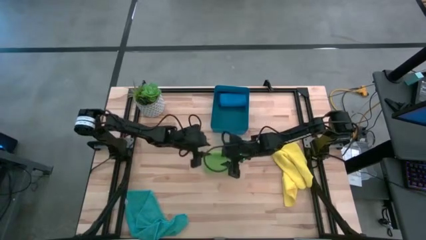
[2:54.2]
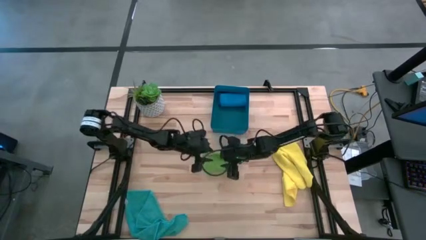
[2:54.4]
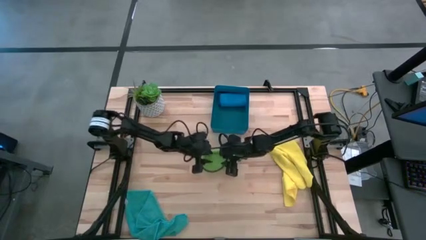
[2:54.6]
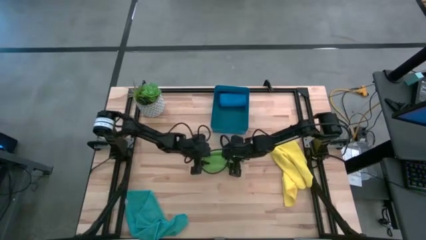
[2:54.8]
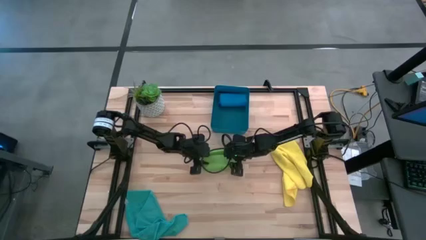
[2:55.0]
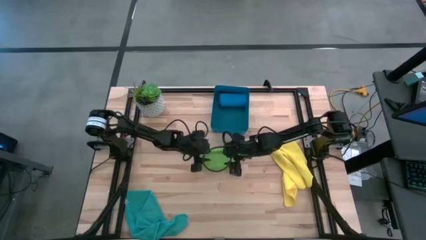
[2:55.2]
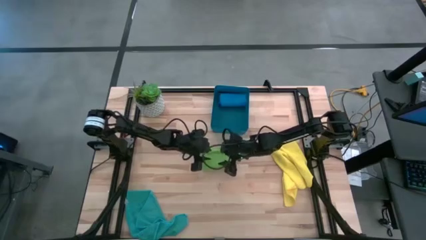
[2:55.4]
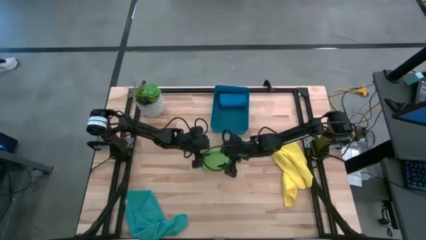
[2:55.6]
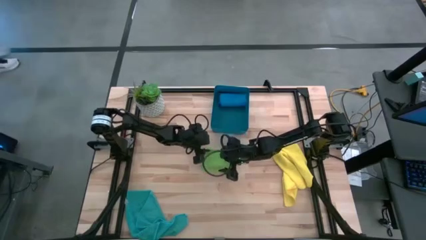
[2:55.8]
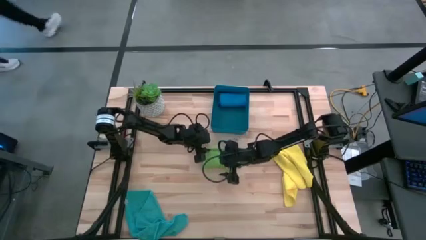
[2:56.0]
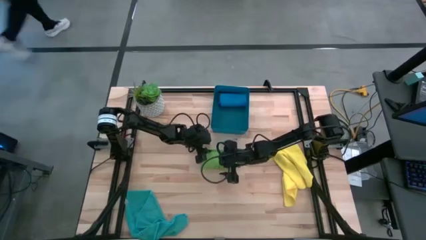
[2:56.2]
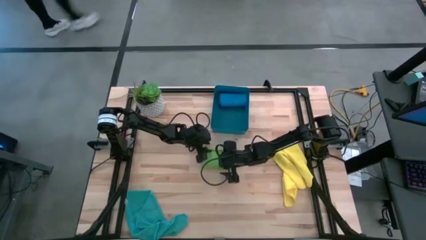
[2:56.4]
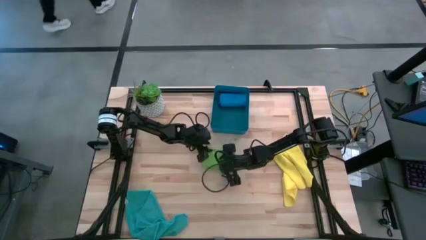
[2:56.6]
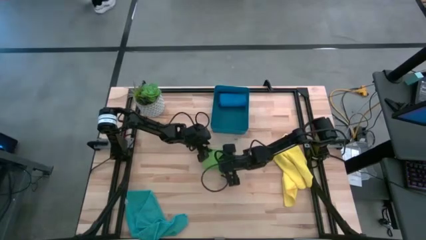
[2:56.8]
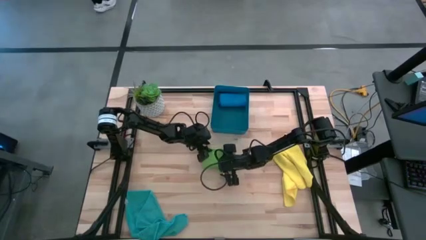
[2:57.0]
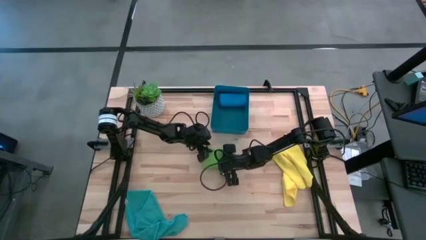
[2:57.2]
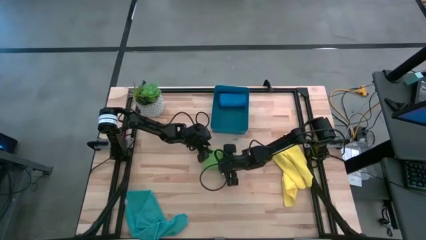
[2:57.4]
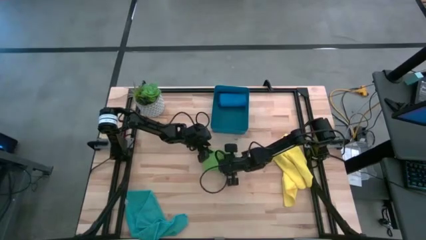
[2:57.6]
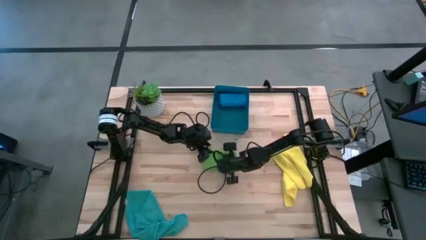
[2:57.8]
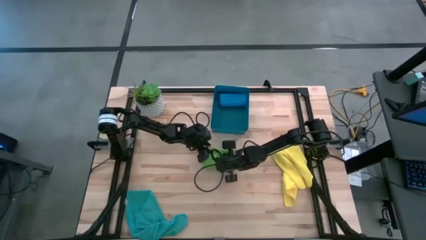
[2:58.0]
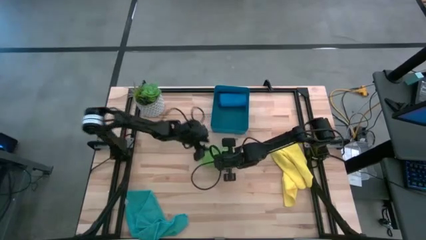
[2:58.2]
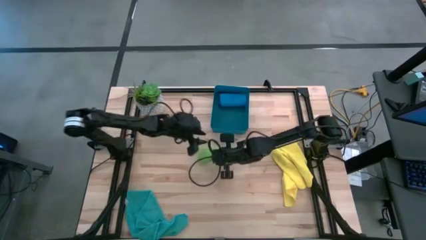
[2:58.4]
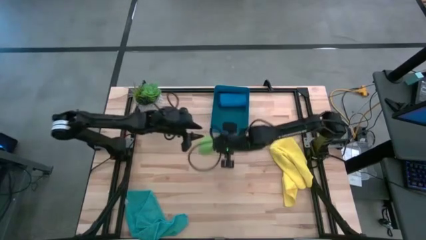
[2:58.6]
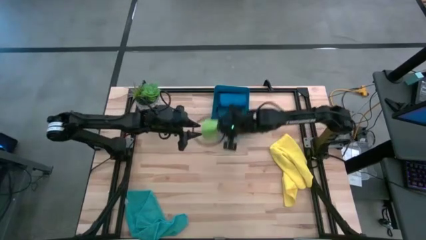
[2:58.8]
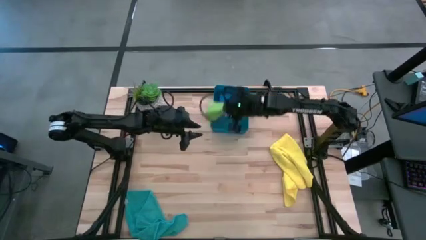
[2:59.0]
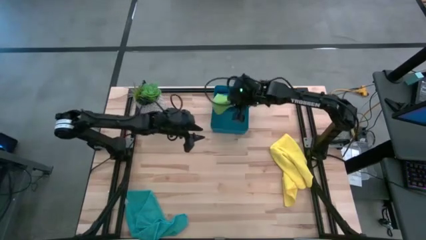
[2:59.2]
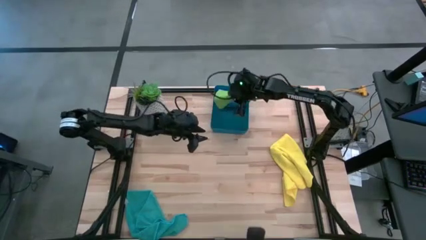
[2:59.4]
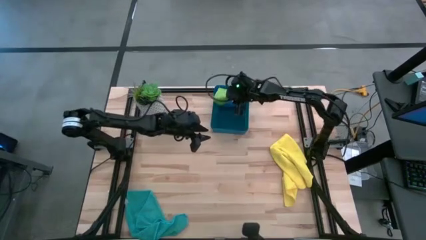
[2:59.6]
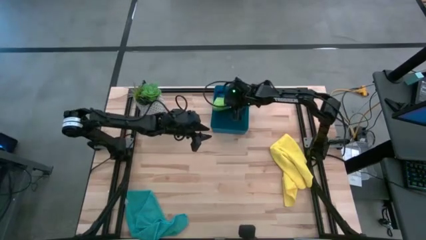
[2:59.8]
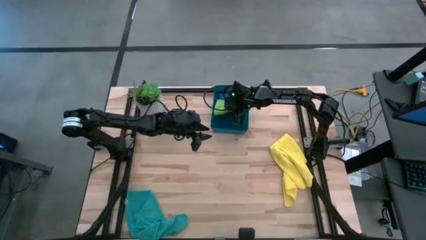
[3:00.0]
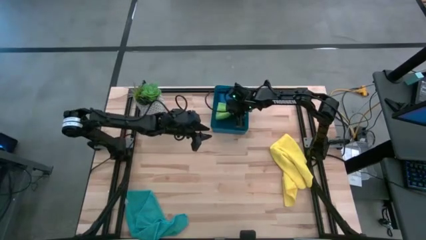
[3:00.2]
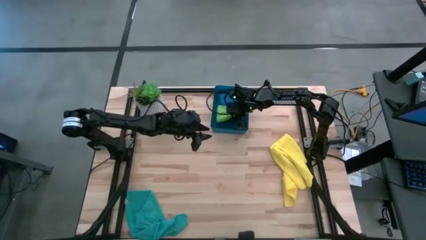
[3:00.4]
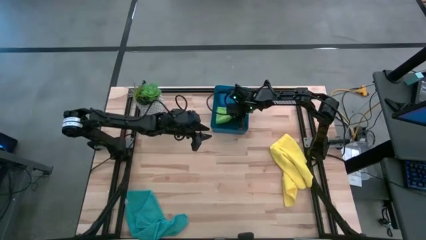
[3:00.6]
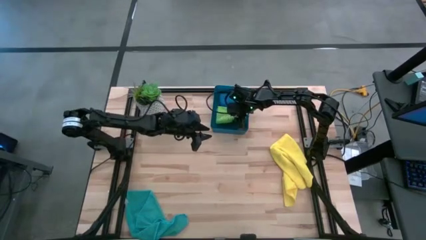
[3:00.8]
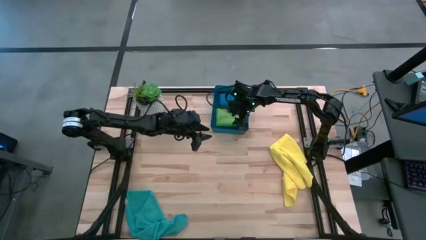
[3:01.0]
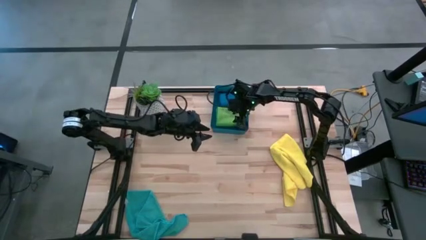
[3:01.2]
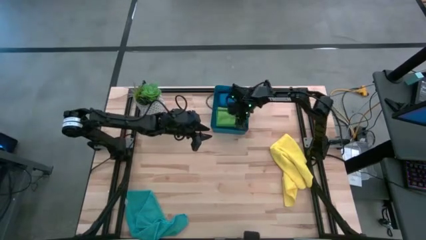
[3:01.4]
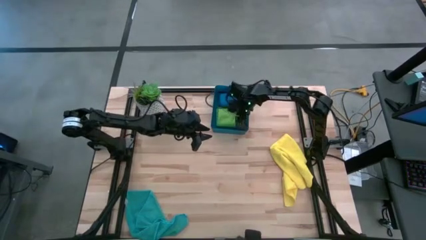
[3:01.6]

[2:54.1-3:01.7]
Task: Fold microfiber towels
Put the green microfiber cloth into the blue bin

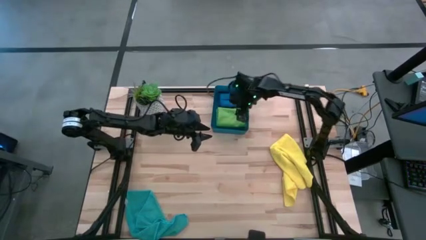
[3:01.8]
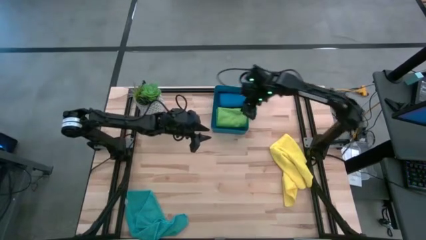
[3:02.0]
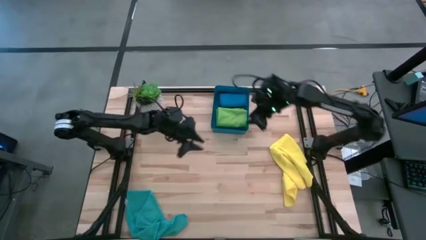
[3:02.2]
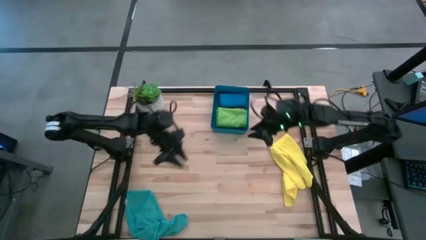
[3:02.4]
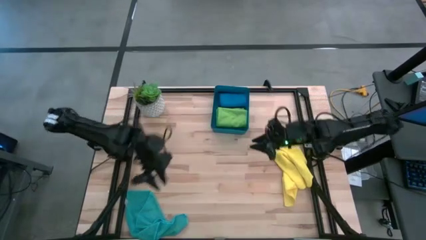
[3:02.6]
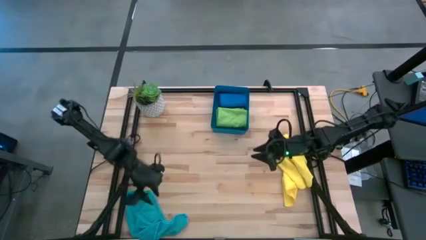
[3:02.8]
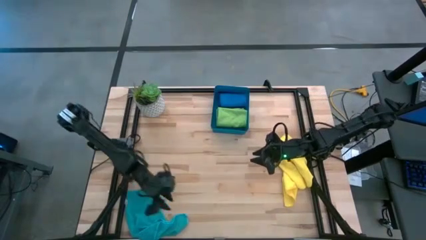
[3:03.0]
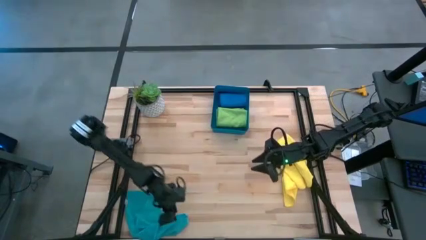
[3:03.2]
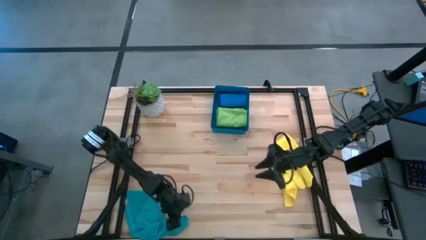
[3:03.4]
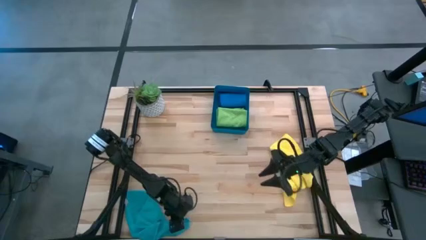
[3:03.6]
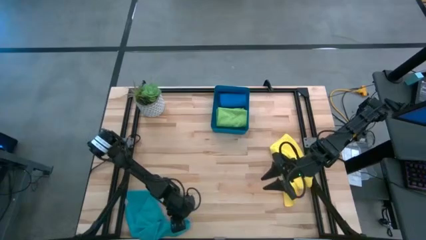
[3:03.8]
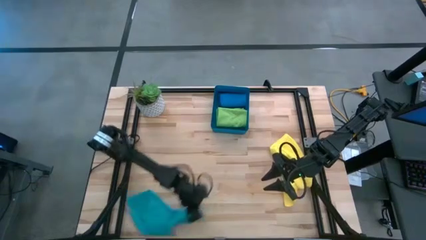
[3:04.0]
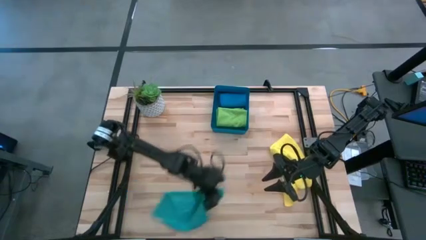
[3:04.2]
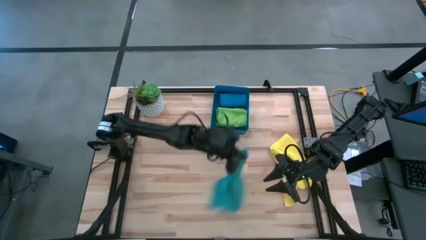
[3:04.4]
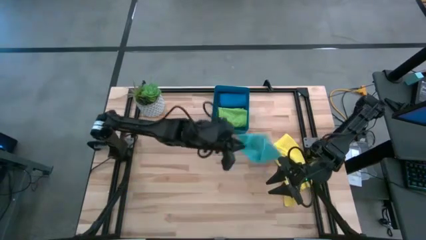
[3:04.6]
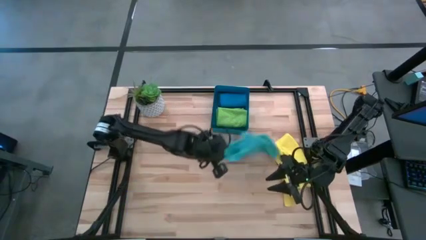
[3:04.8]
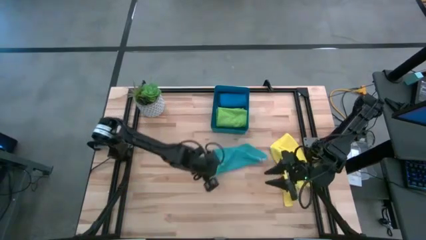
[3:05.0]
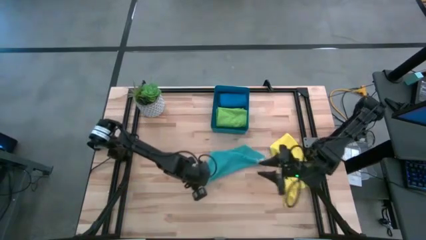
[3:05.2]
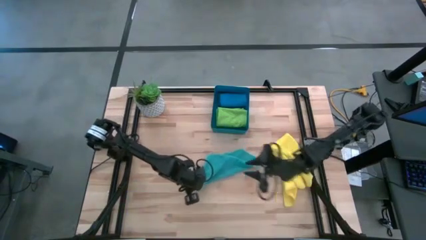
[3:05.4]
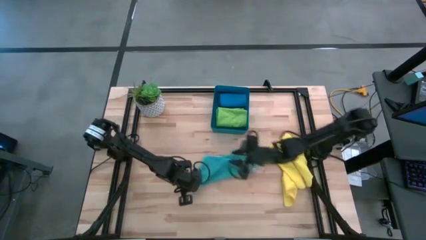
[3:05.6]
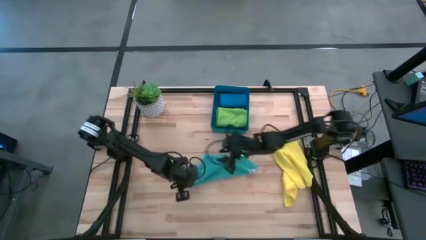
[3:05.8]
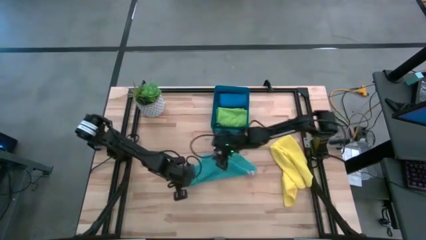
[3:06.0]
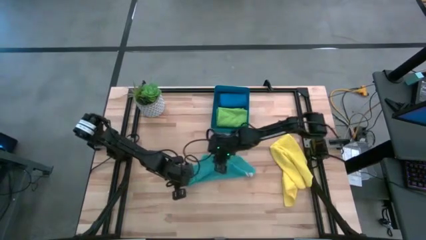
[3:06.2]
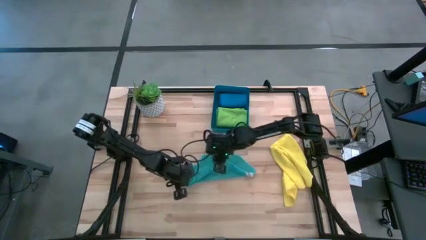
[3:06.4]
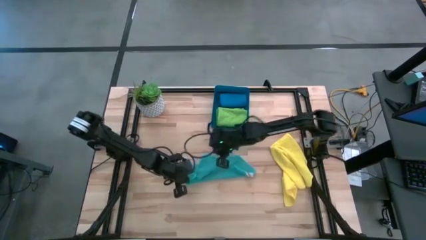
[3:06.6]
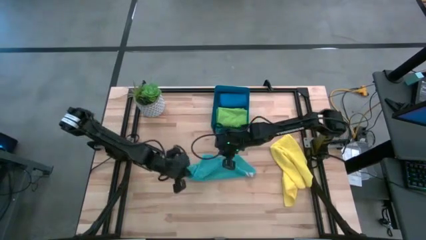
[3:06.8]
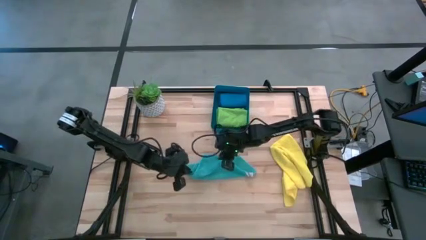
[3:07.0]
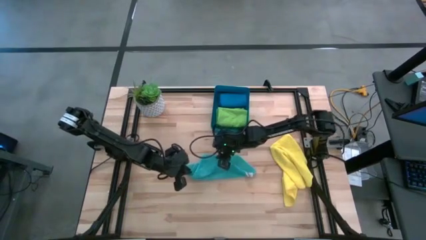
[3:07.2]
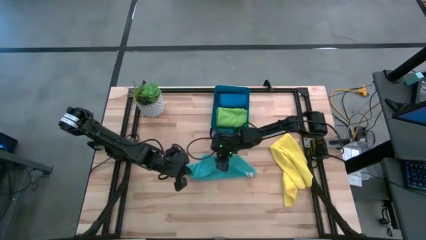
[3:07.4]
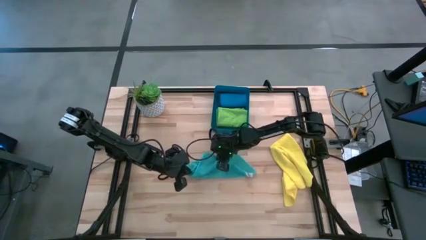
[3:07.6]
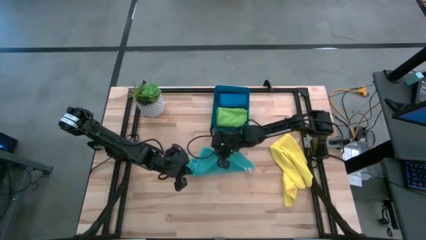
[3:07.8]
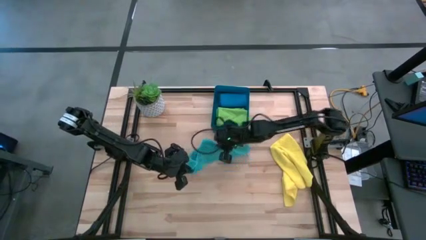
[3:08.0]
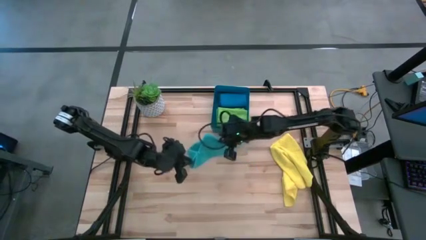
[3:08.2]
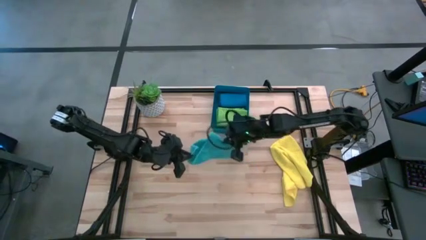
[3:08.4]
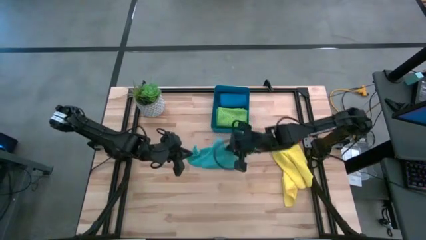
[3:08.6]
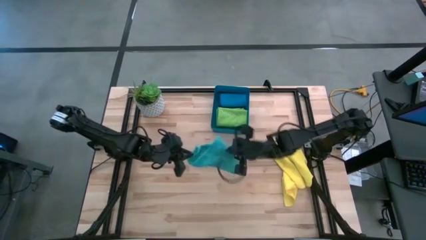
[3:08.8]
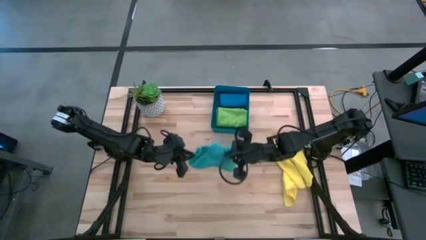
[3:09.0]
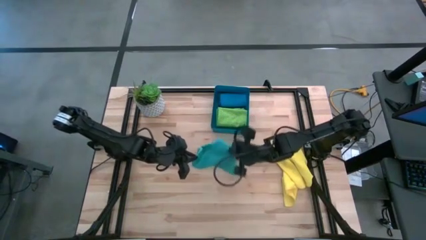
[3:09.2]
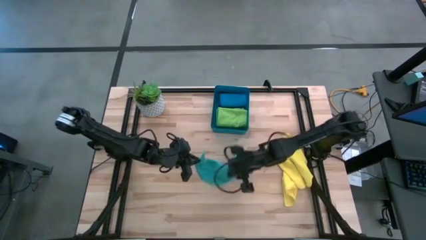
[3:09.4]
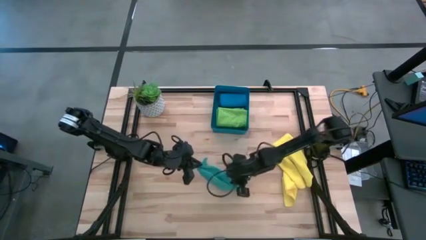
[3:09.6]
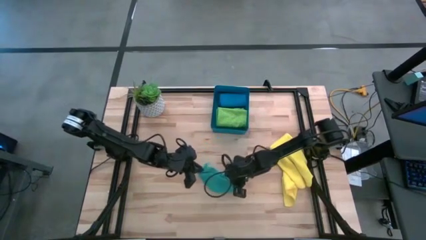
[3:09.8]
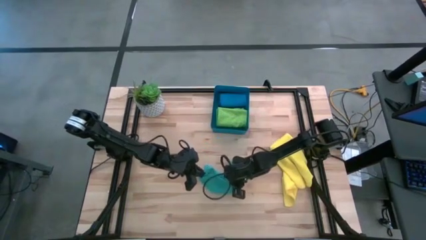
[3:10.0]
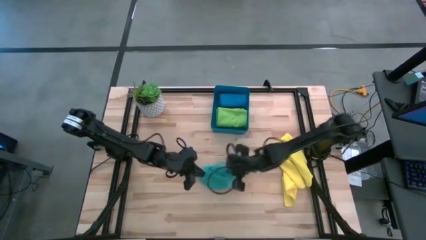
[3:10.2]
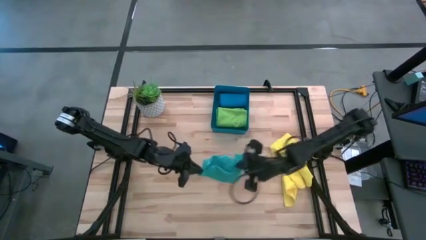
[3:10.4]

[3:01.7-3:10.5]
Fold the light blue microfiber cloth
